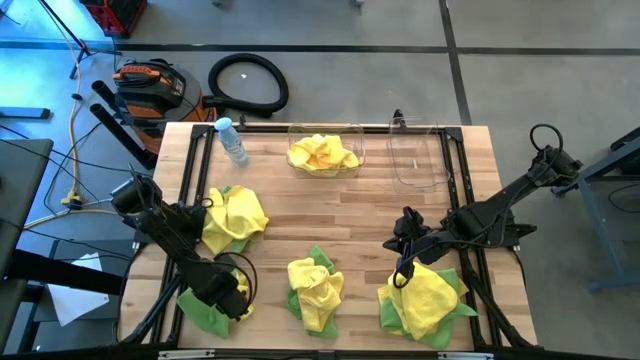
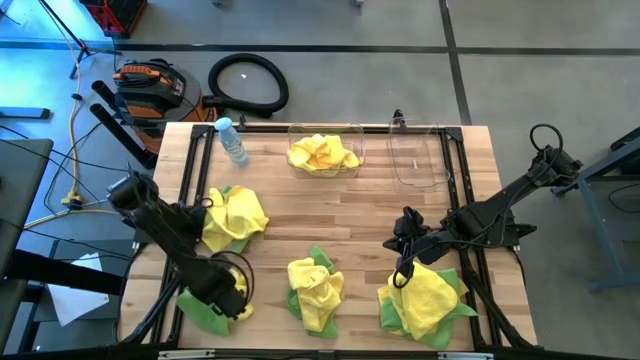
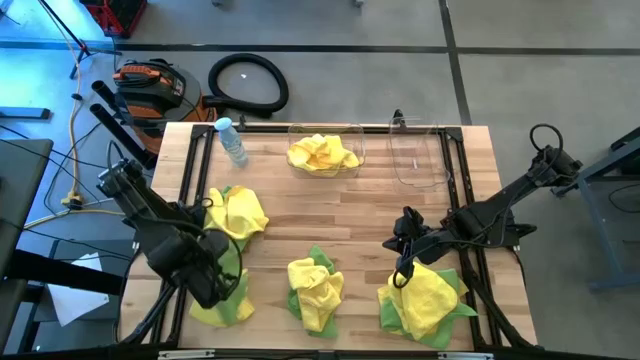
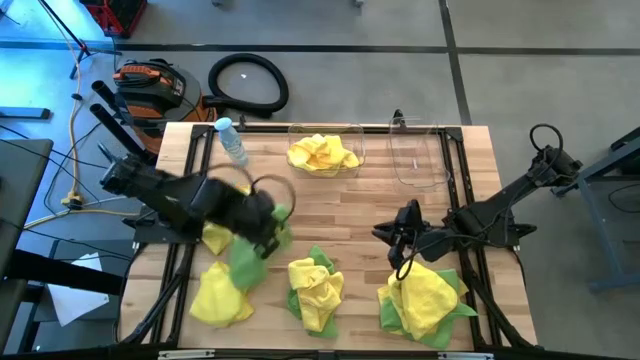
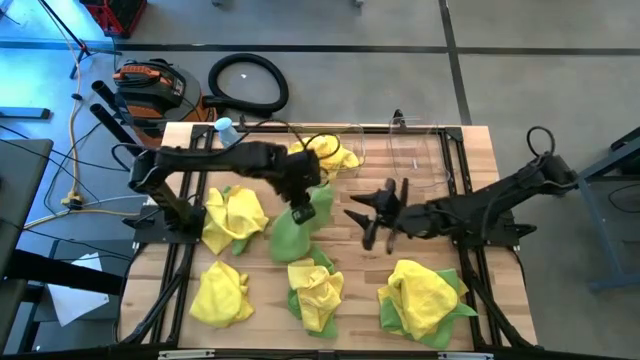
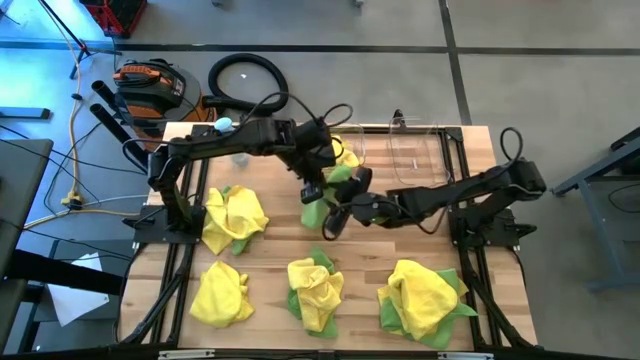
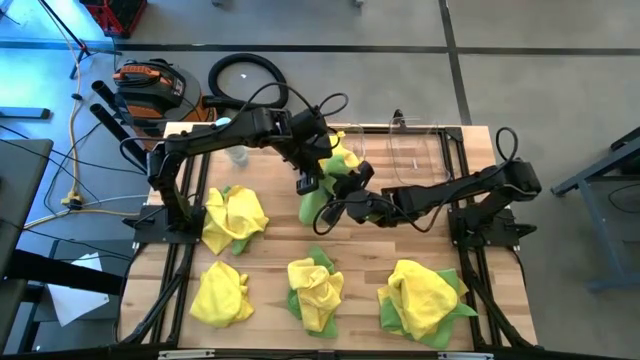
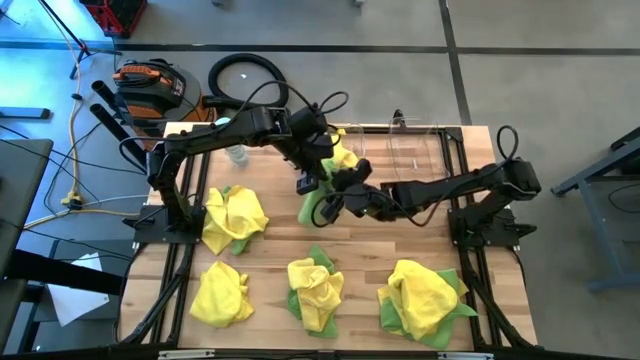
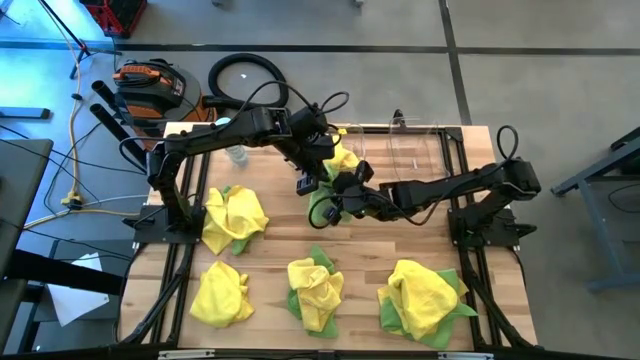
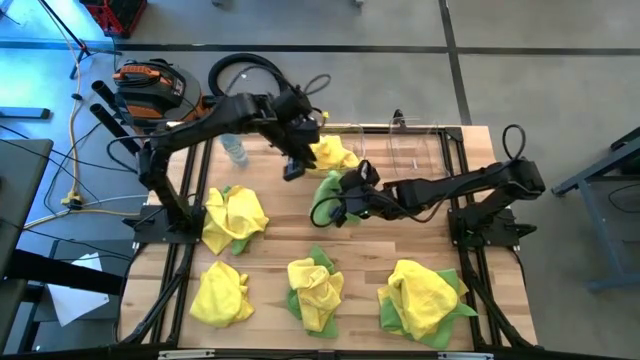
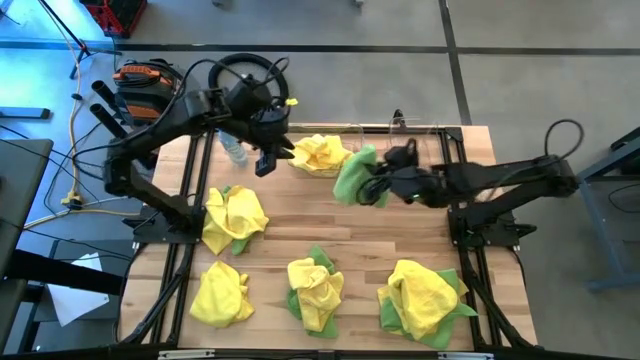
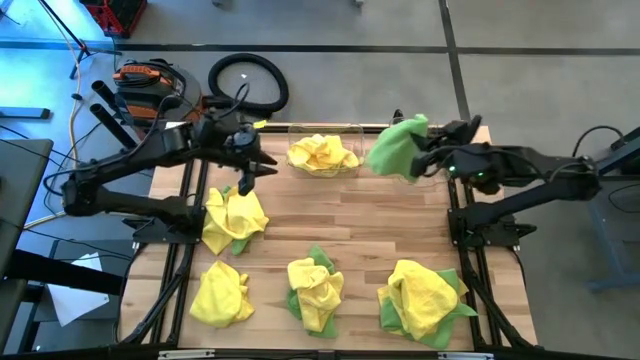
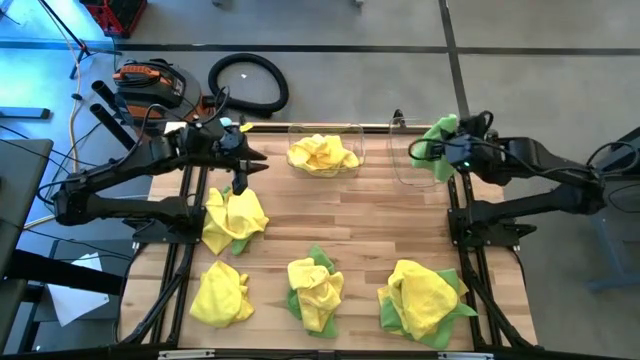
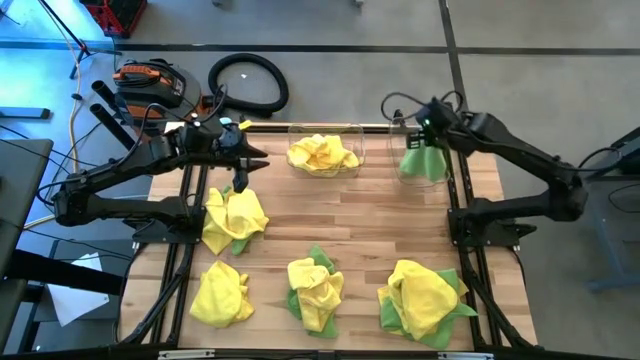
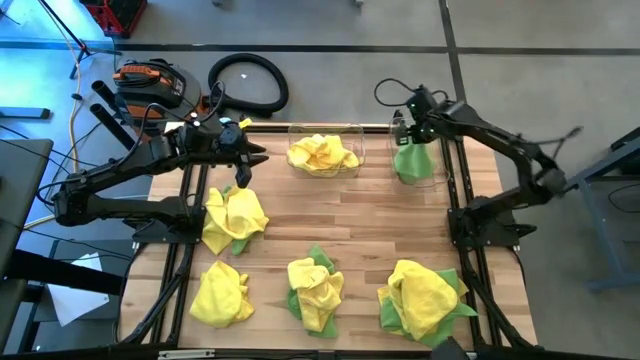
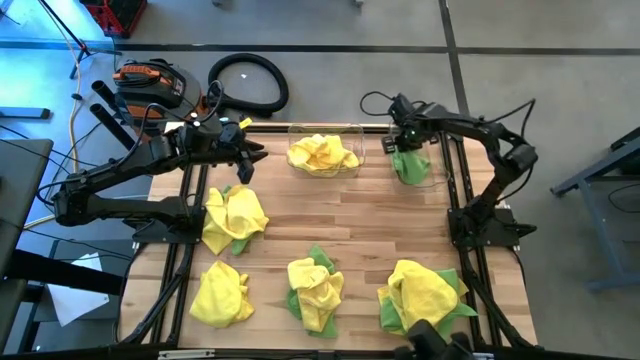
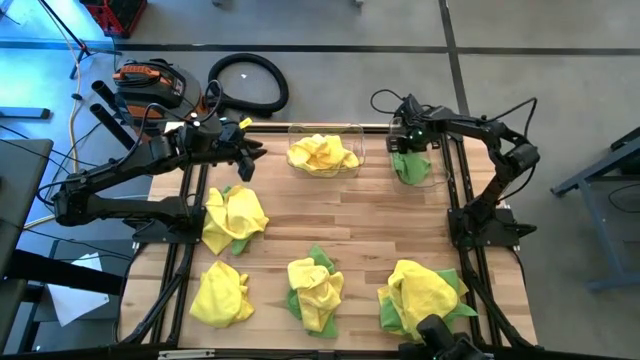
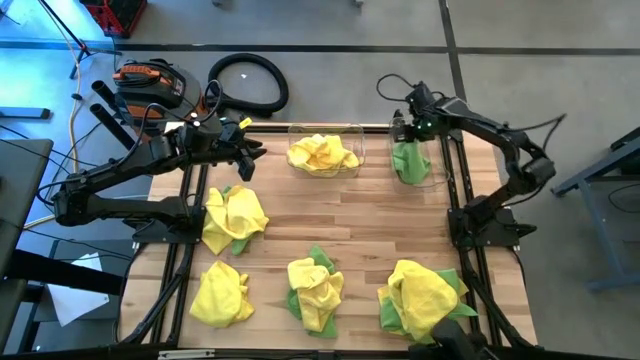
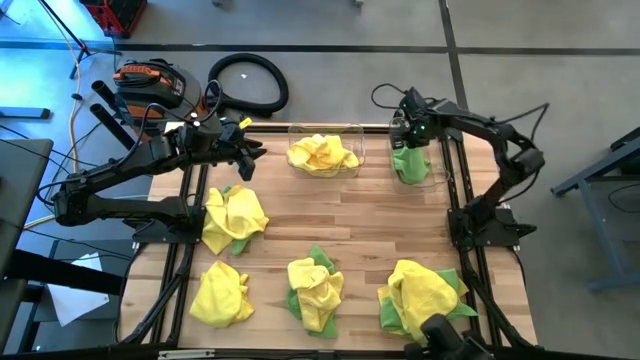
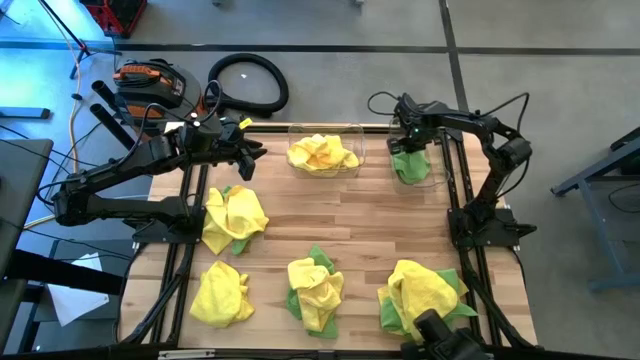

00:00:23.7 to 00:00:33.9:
Task: Sort microfiber towel by color & place in baskets
Put the bottom left green microfiber cloth into the right transparent bin

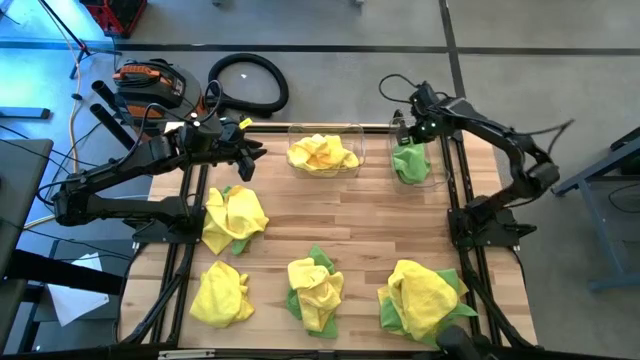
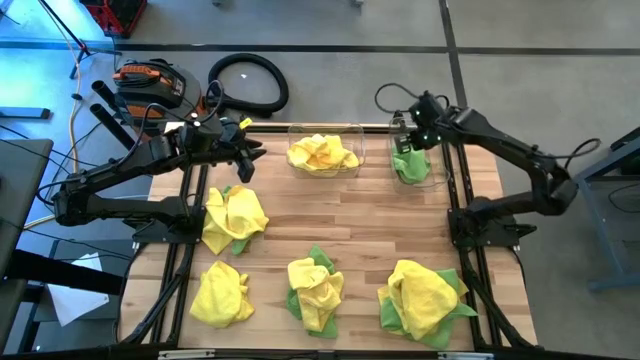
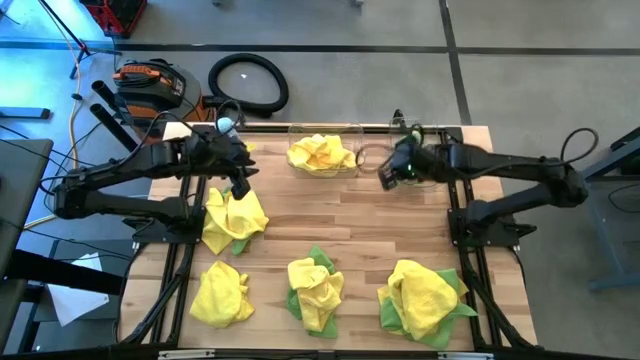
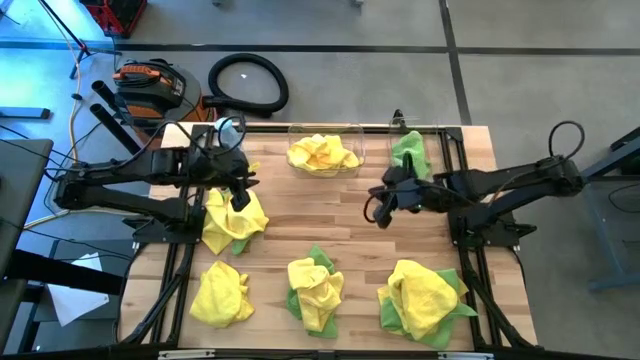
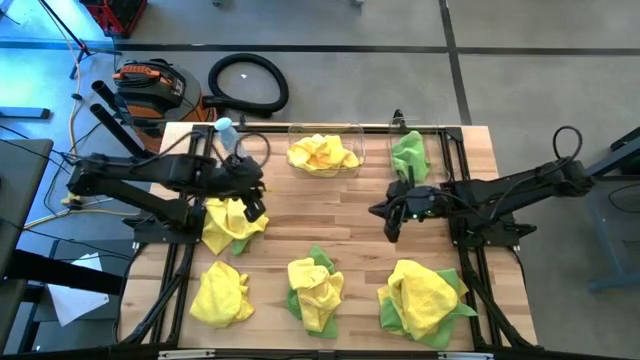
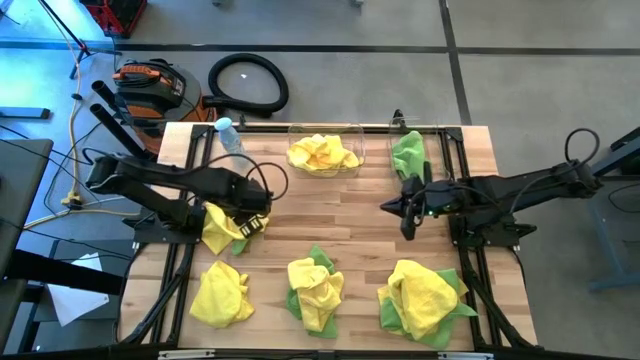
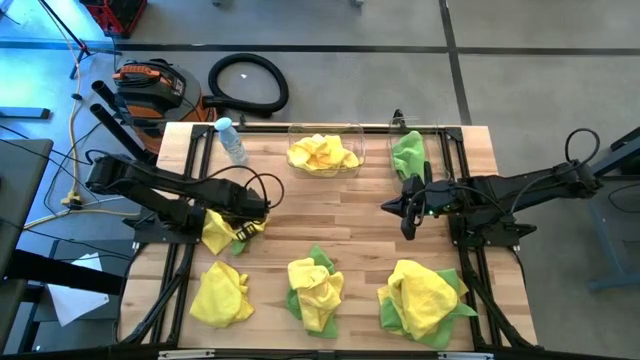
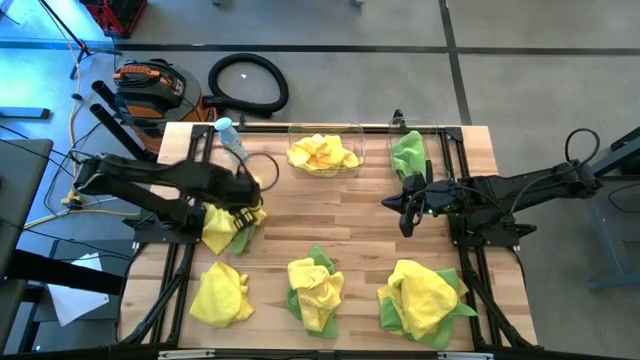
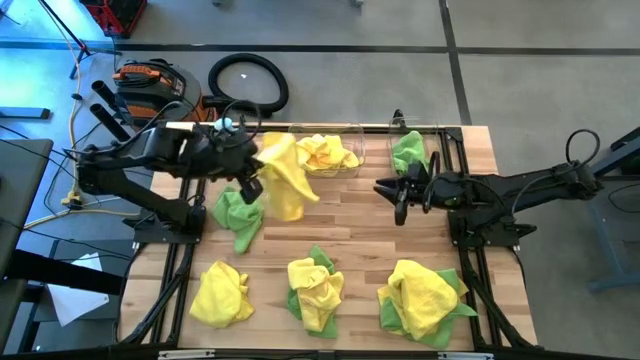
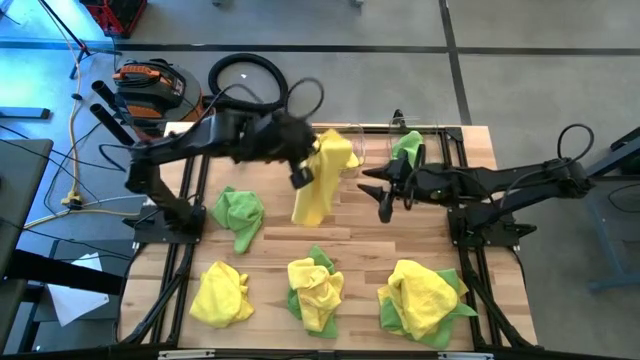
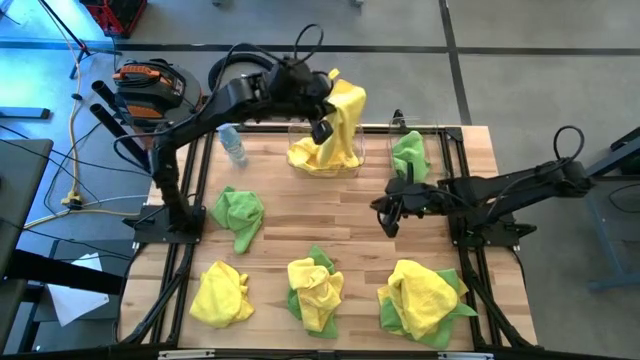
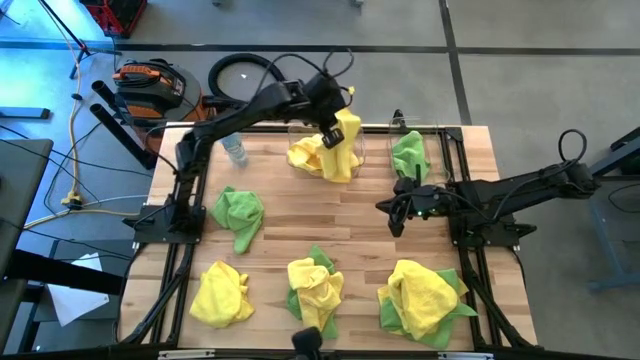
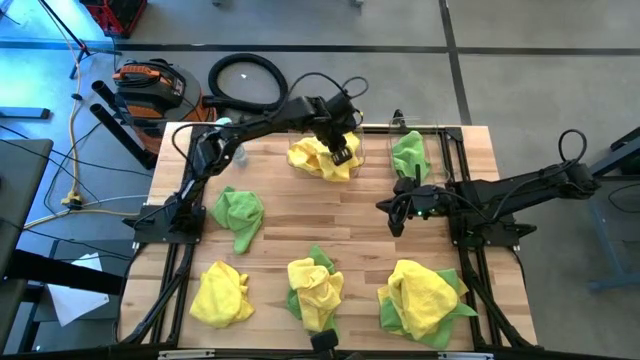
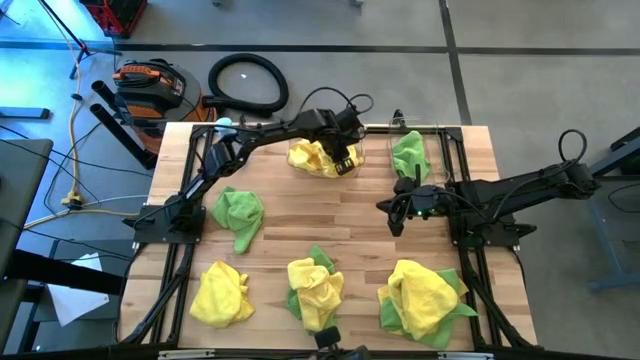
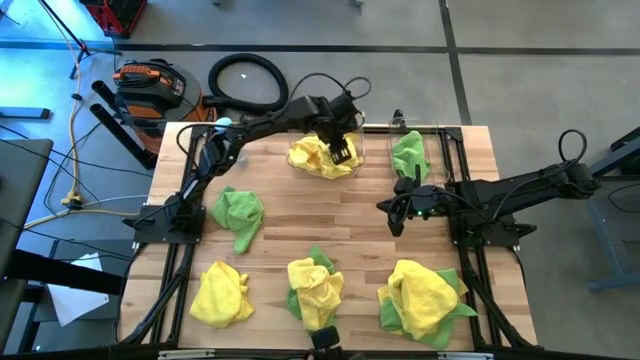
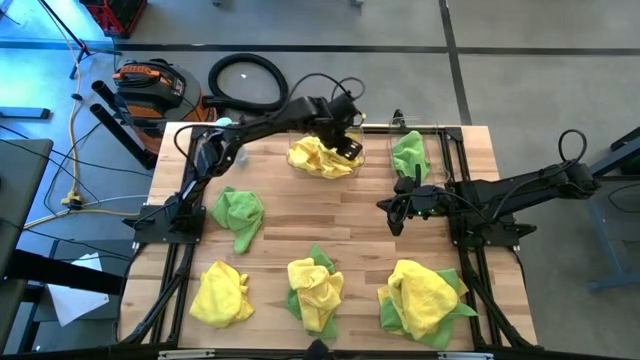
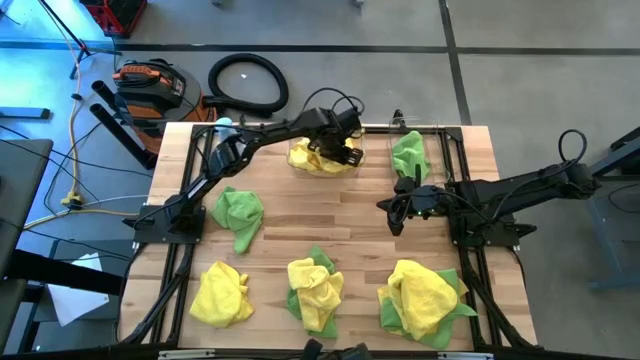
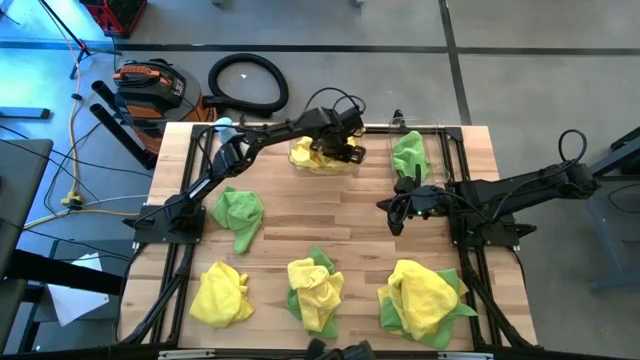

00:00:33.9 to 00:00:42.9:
Put the top left yellow microfiber cloth into the left transparent bin
